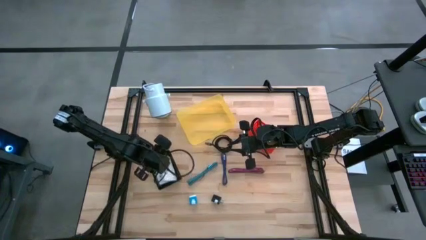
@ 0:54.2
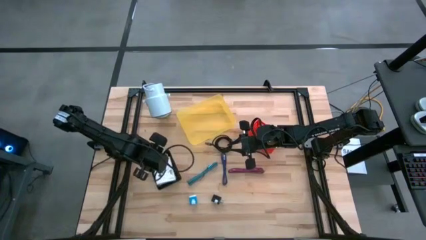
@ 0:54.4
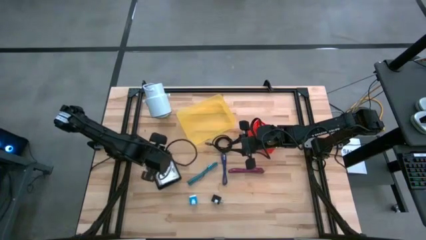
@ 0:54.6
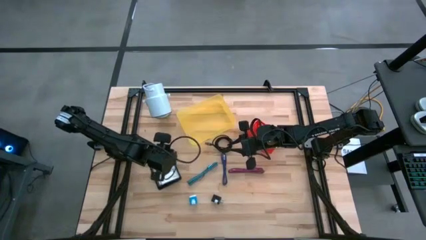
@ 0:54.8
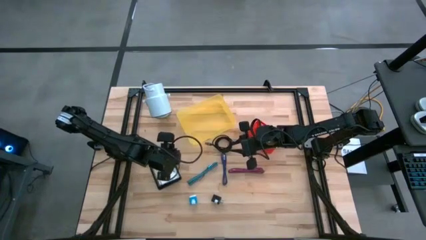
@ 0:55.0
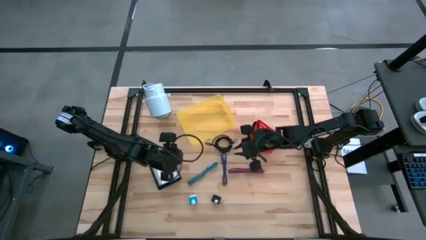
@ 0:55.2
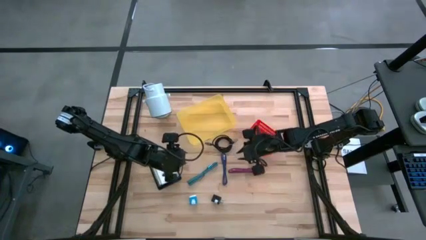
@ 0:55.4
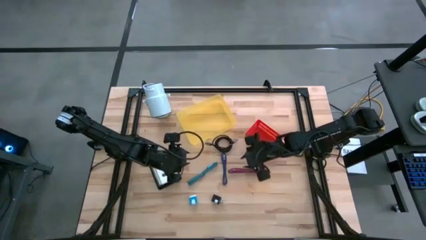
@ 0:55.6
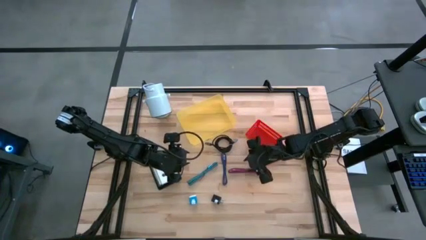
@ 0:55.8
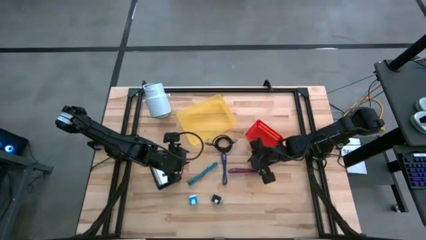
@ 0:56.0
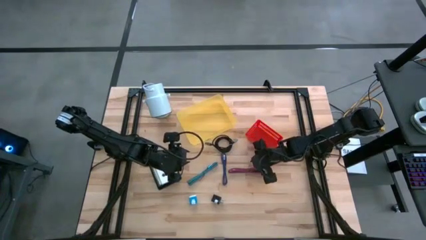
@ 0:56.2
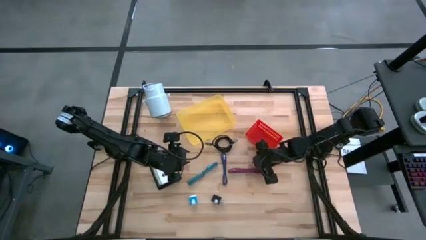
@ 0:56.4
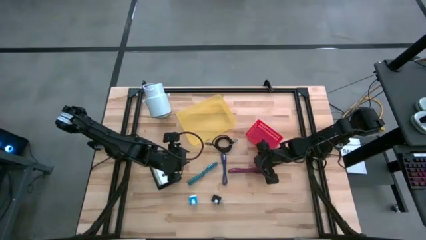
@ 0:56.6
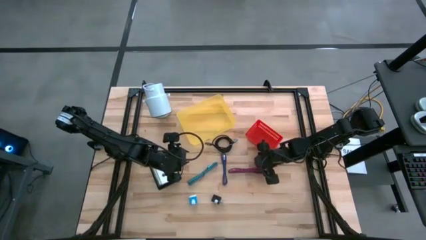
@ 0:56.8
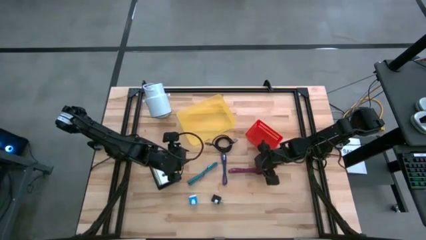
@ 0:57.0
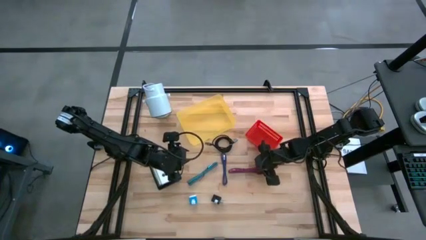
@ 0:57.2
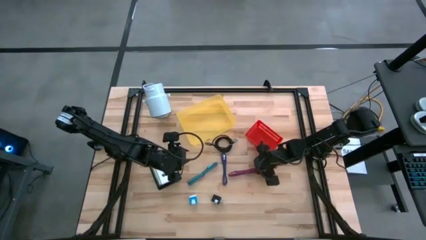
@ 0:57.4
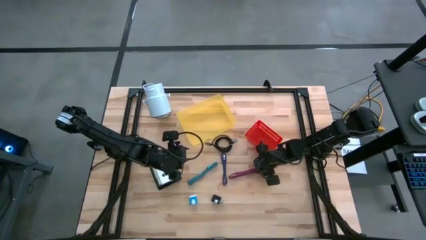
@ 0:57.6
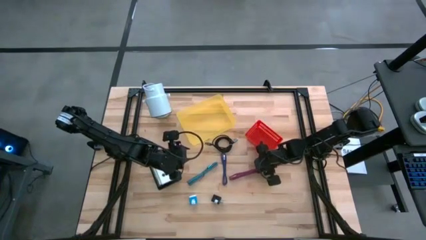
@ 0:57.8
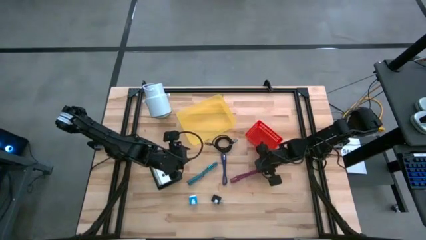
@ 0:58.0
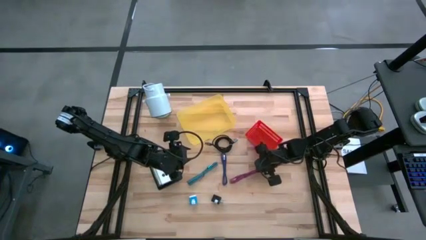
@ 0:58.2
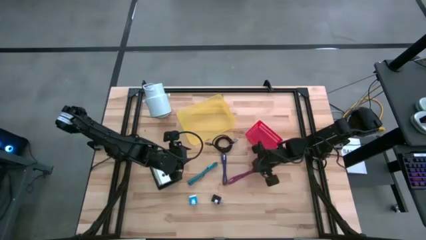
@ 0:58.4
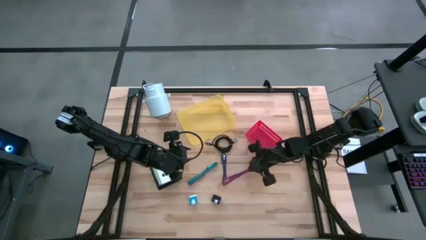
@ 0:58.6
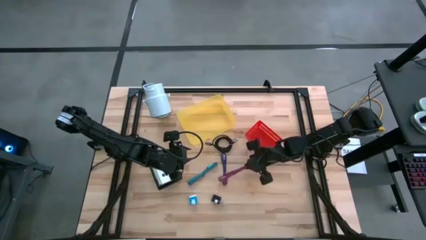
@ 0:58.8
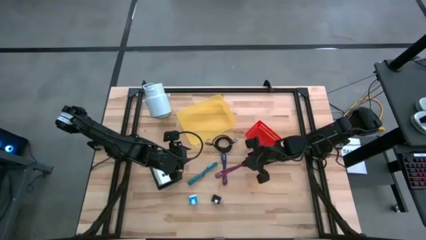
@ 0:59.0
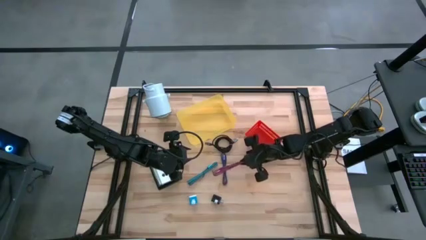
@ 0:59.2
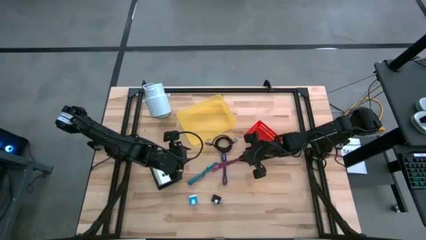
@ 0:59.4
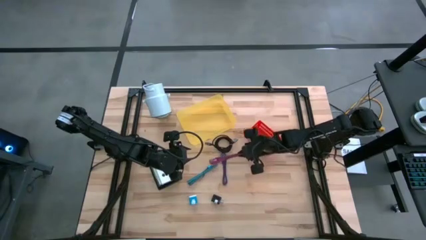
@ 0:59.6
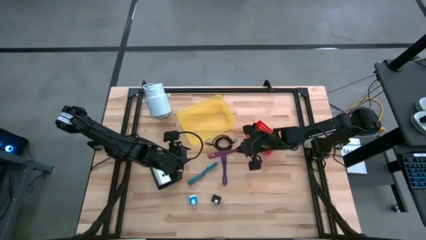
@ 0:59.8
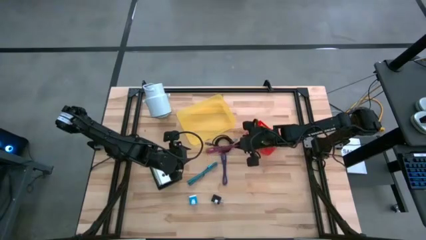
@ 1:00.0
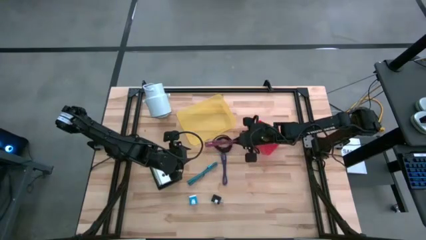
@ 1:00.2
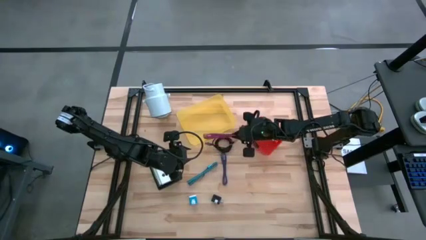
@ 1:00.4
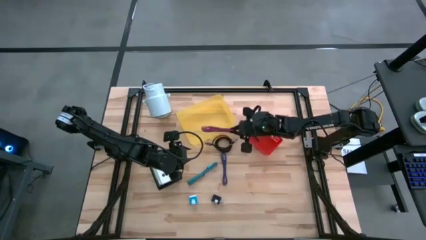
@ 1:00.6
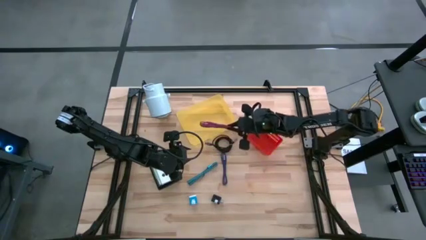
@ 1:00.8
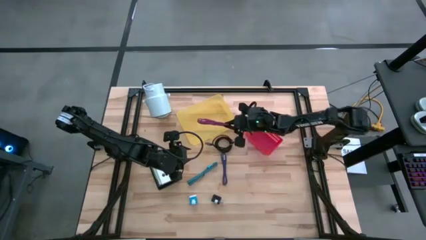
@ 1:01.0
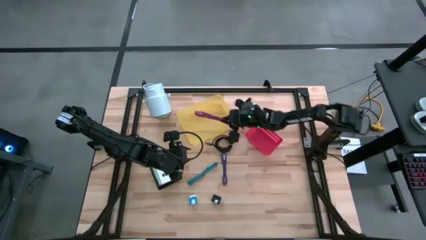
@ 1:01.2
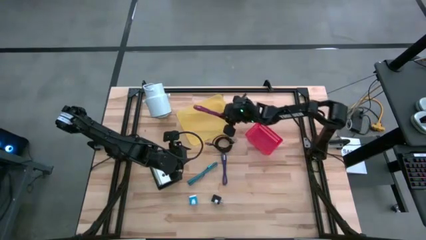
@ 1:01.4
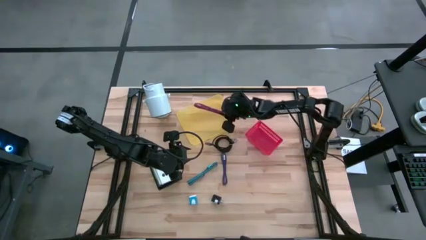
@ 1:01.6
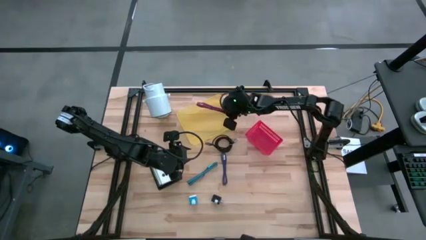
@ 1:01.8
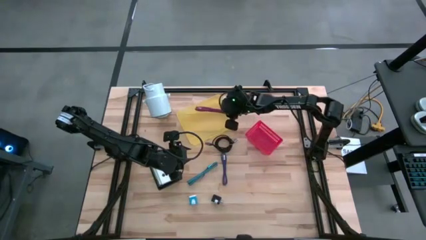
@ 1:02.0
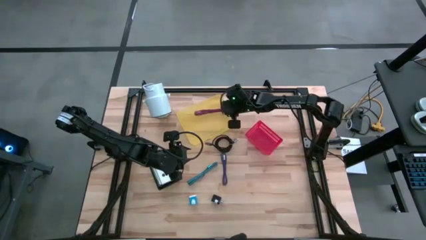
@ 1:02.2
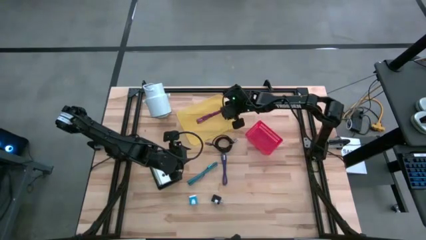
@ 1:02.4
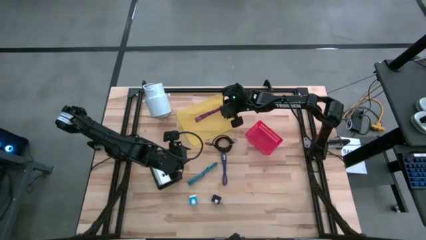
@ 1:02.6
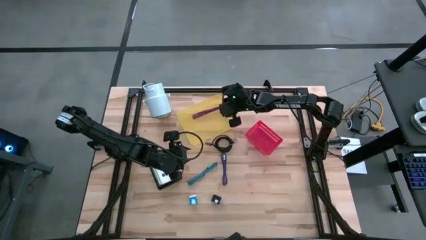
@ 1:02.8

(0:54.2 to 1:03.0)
Task: Pick and place items into bin
Put the pink charger cable into the yellow bin

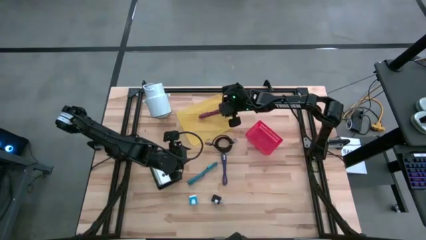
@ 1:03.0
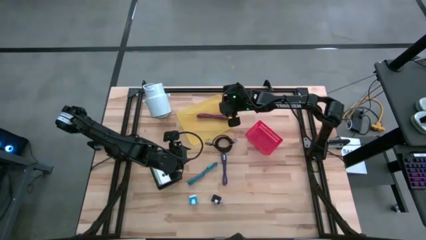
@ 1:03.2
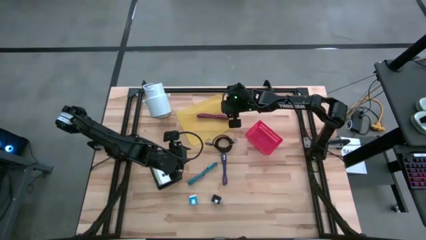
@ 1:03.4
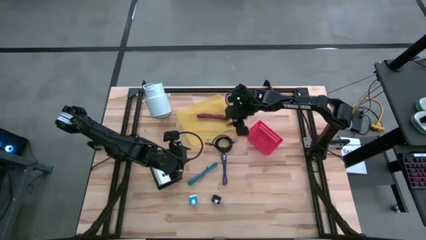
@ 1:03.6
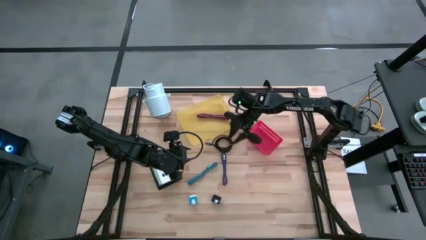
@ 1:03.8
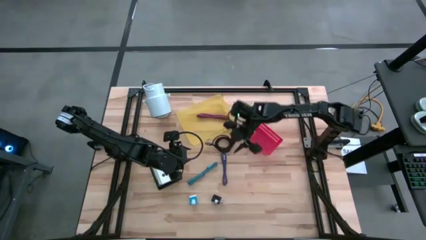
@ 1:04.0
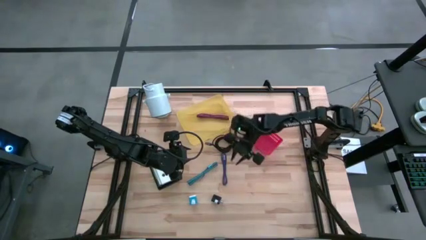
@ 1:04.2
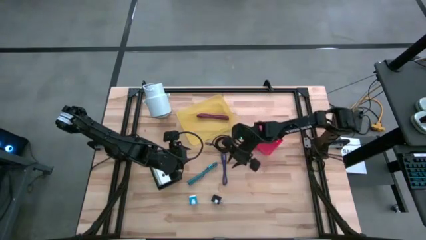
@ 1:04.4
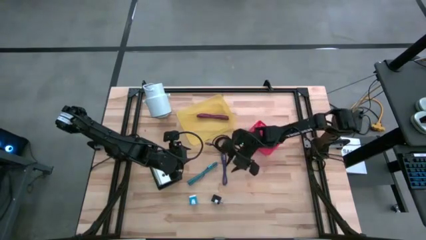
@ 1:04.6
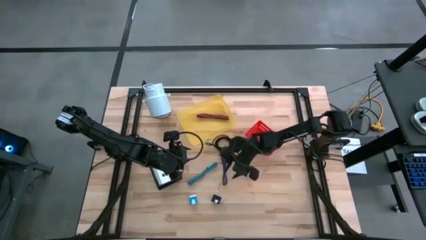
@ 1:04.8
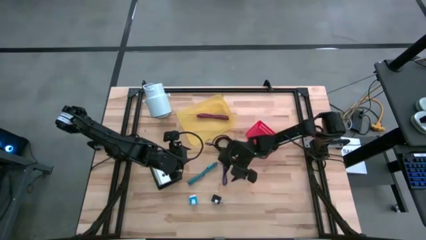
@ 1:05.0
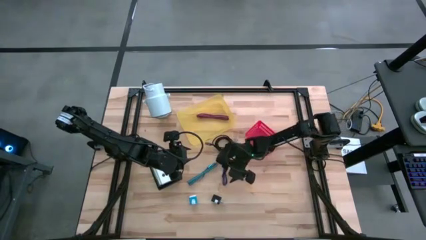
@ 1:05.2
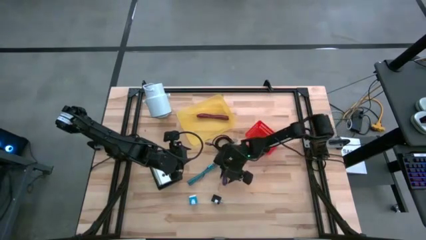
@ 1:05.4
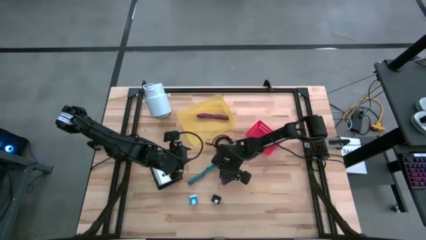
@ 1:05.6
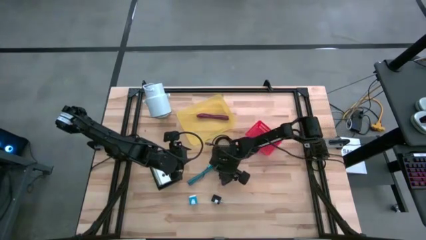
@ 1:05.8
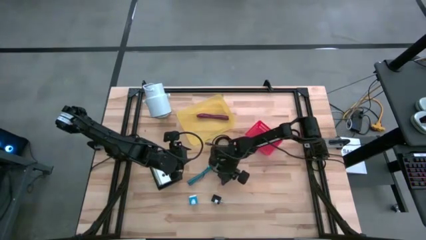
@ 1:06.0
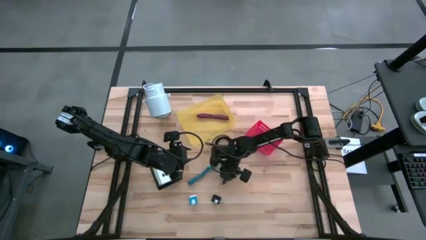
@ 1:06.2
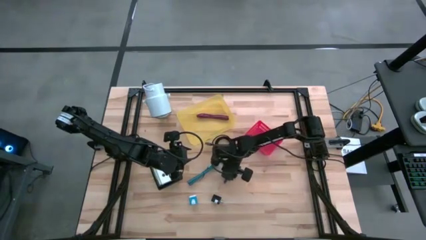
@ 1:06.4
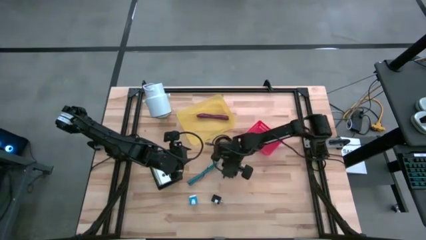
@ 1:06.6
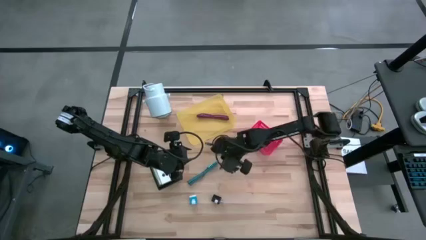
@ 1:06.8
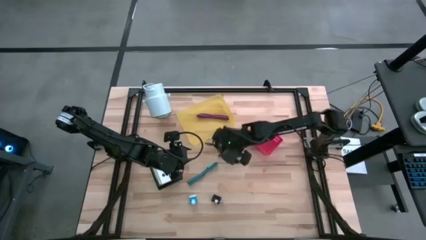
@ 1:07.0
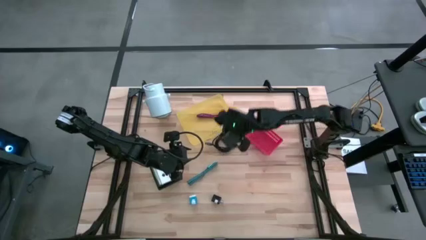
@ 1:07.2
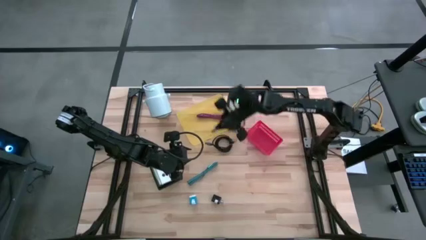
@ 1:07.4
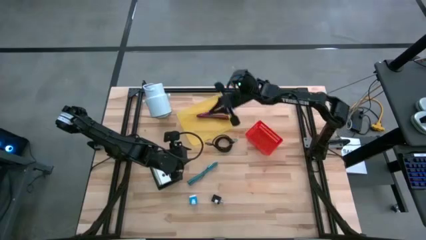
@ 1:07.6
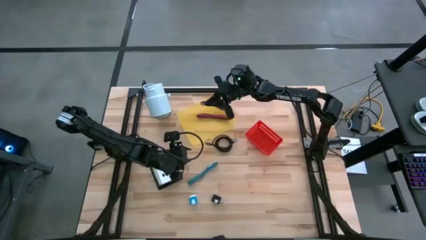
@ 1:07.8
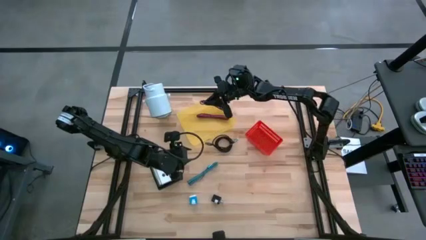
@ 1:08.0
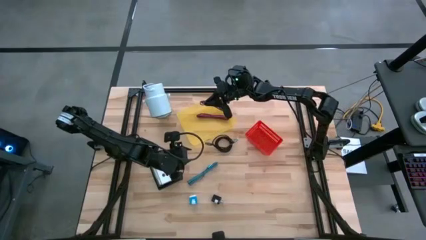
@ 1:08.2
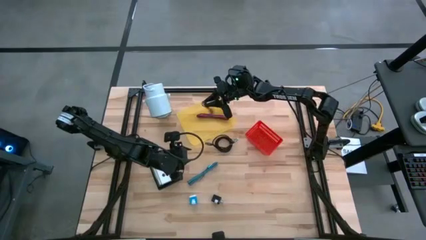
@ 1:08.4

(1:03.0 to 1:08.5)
Put the violet charger cable into the yellow bin

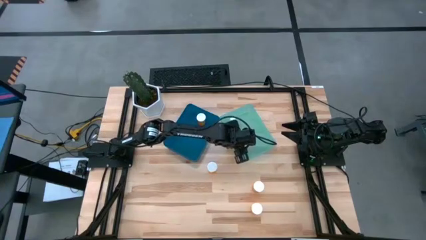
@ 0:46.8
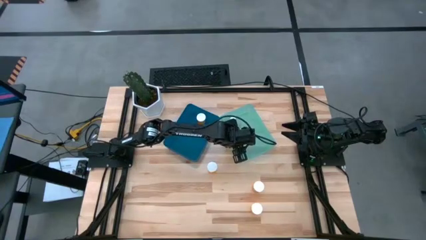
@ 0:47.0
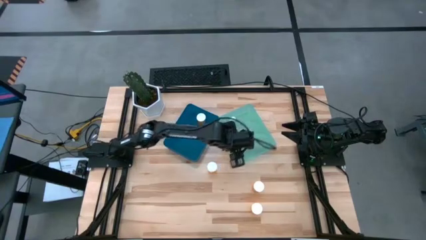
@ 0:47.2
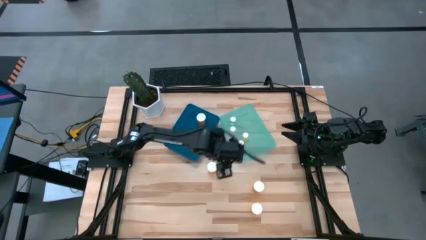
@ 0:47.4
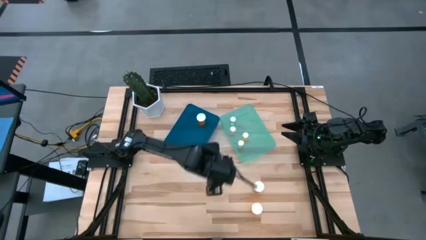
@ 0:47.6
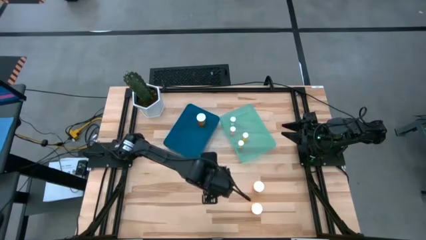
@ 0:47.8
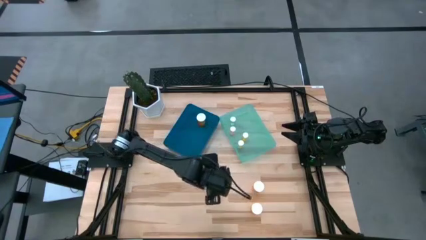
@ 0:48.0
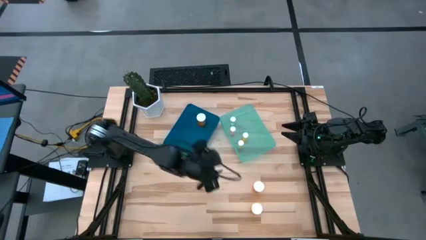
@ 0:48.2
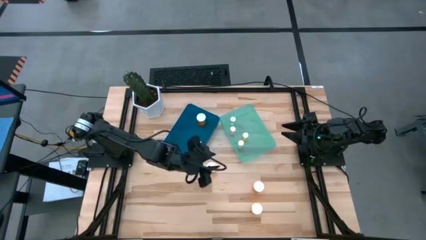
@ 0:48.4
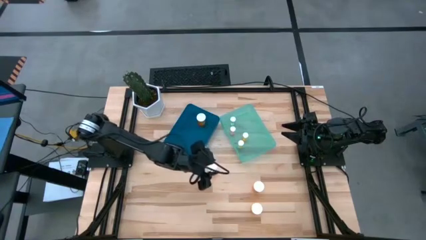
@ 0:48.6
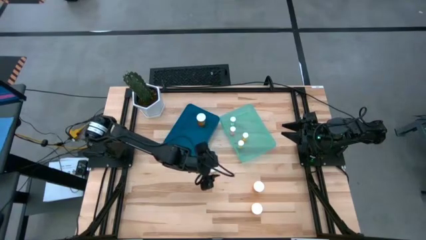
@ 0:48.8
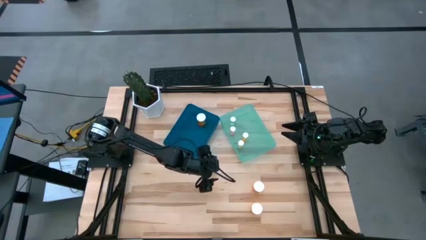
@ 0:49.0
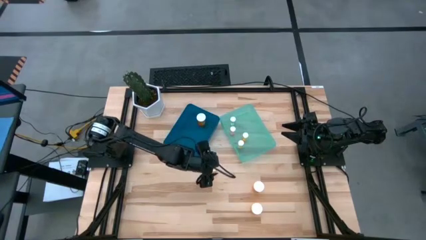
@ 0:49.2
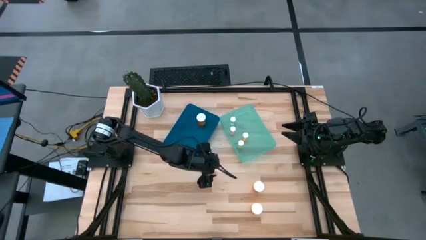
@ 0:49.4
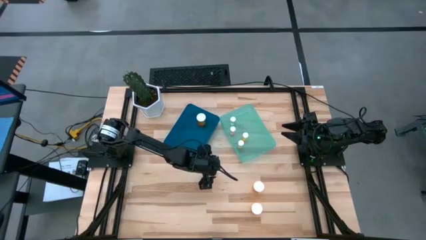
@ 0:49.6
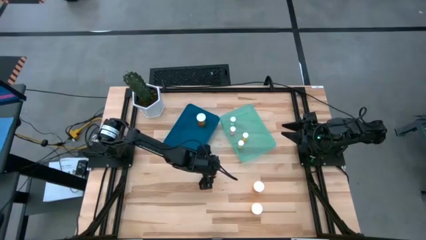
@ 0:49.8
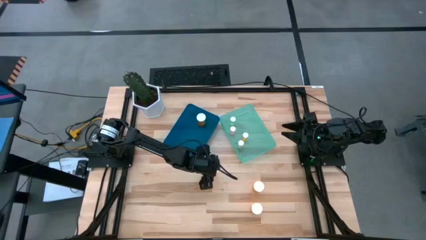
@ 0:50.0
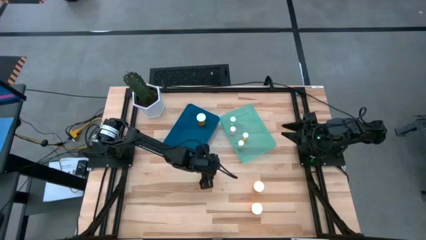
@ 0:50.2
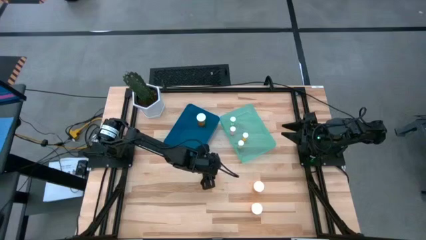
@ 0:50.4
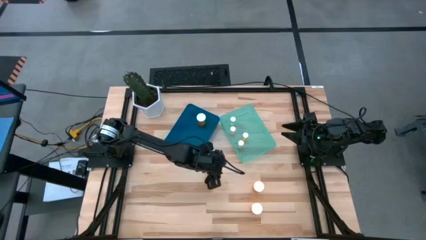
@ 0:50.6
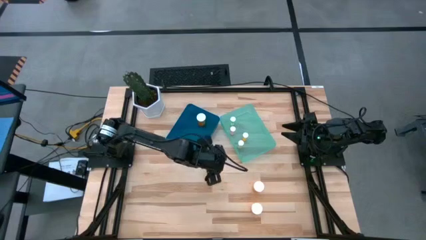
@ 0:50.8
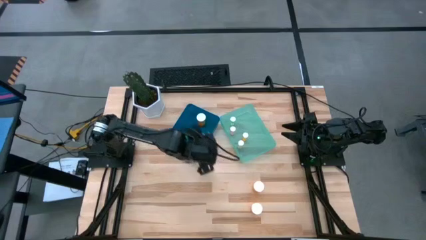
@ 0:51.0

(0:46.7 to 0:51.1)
Task: Pick and place medicine bottles into bin by pill shape (circle, oval)
Put the yellow pill bottle into the blue bin
